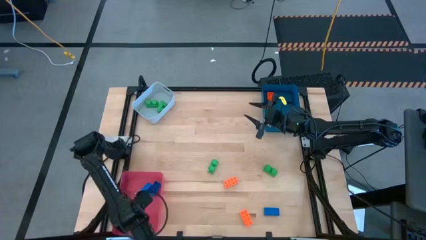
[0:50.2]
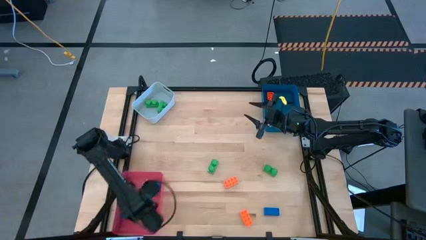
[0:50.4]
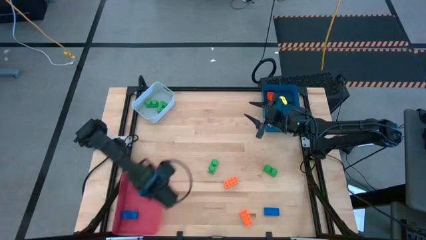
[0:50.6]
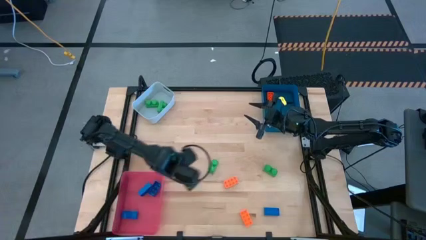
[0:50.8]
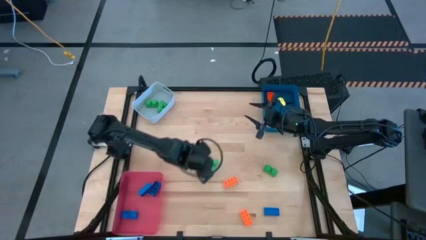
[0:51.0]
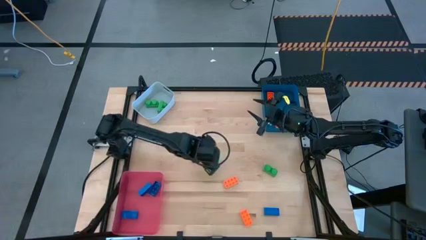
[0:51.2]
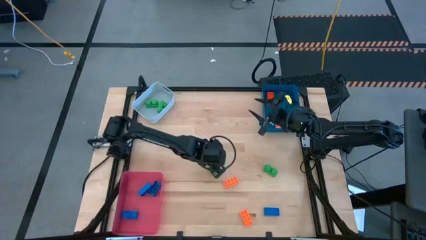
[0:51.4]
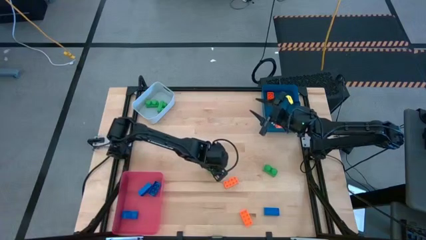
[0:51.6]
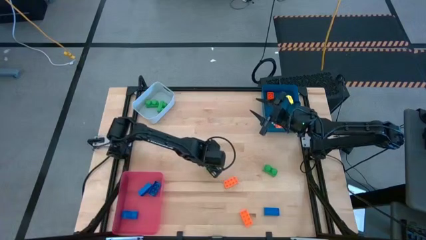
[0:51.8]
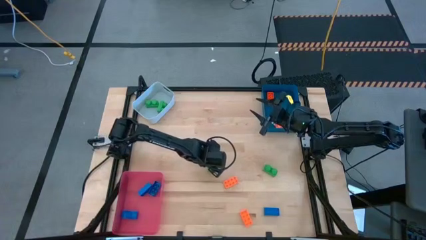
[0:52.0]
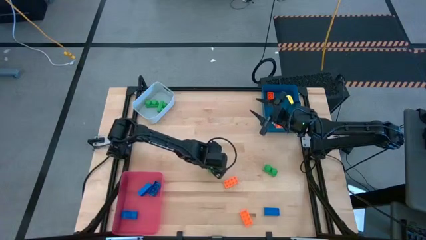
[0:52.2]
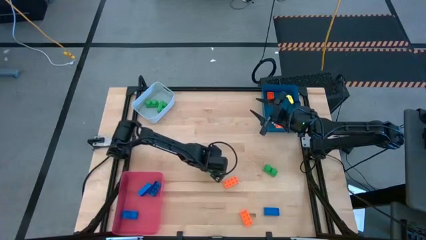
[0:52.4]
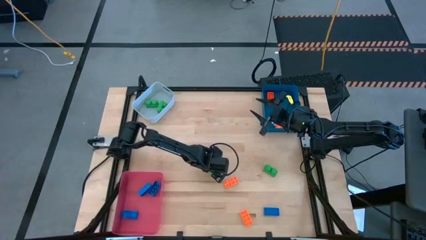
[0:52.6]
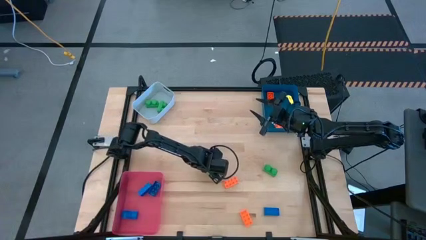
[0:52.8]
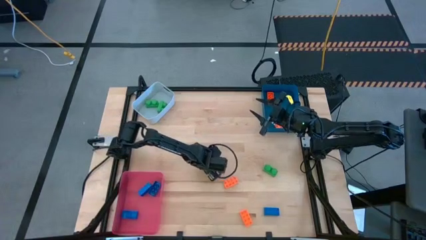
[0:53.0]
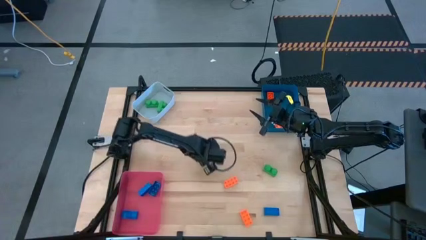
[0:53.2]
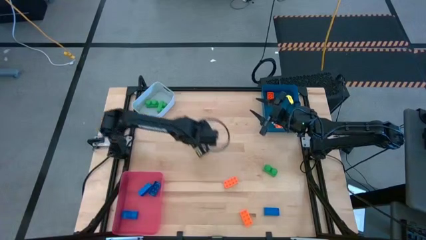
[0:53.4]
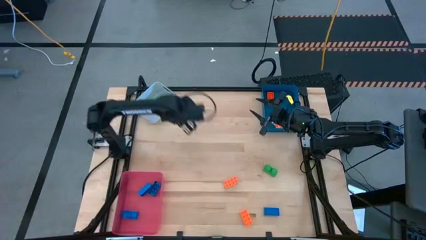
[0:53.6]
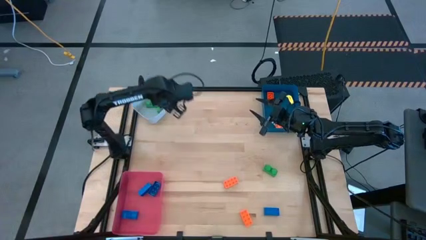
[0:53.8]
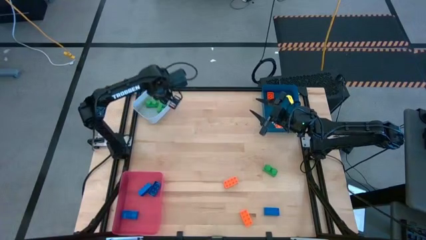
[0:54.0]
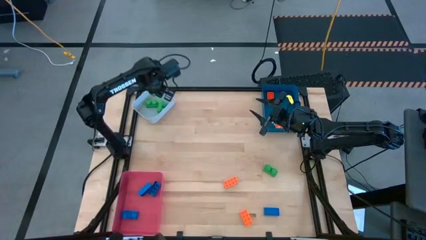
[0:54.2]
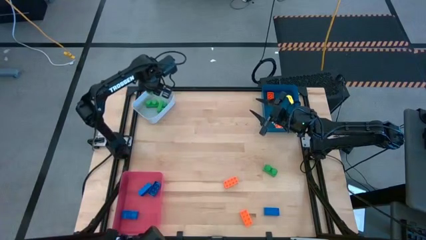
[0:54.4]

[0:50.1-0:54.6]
Task: Sort & place blocks by color
Put the green game piece into the gray bin

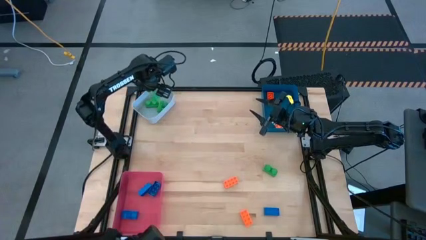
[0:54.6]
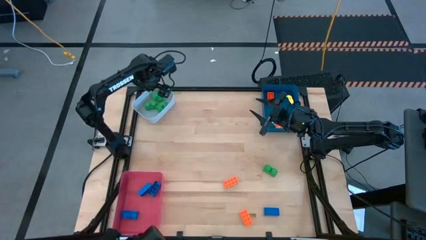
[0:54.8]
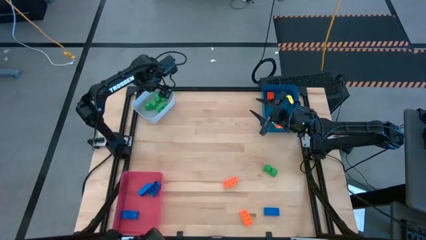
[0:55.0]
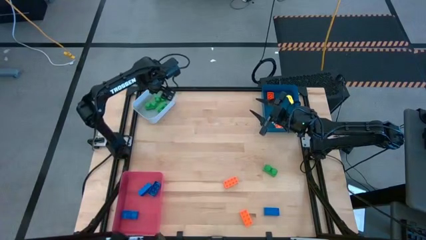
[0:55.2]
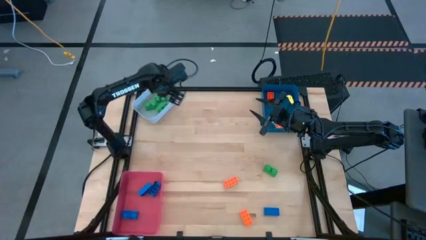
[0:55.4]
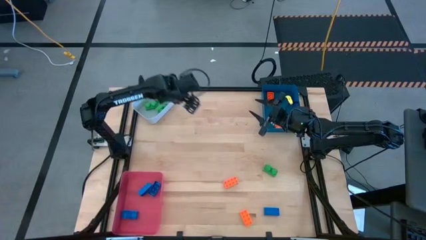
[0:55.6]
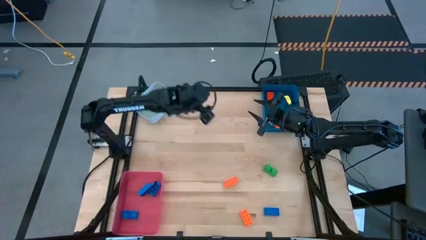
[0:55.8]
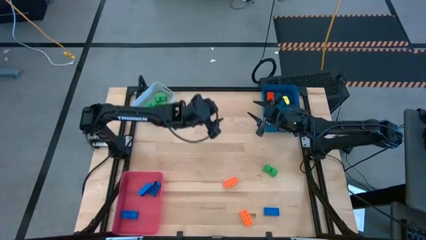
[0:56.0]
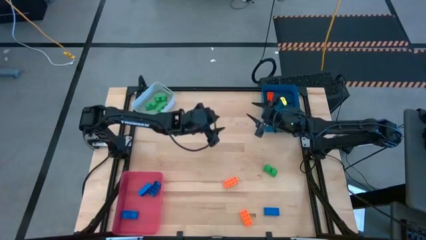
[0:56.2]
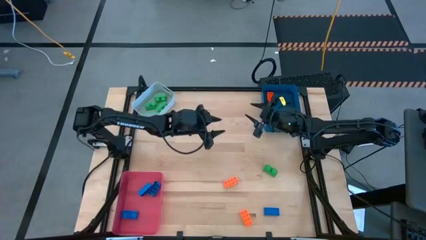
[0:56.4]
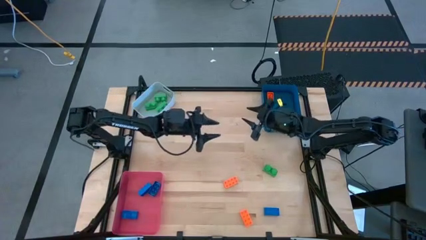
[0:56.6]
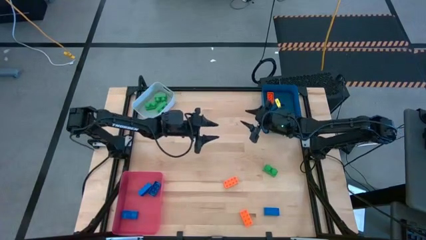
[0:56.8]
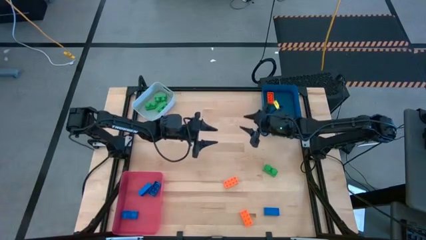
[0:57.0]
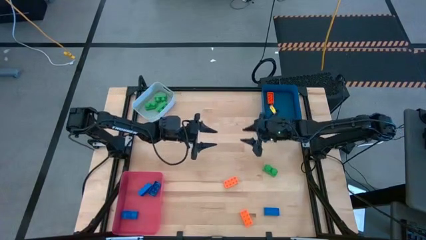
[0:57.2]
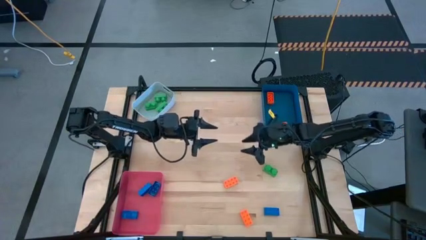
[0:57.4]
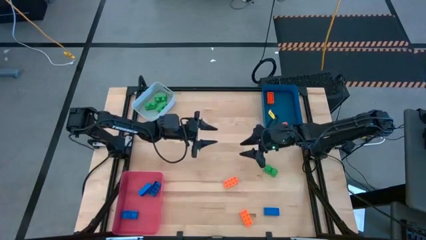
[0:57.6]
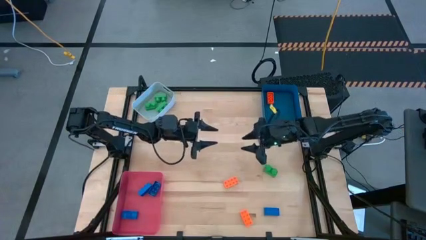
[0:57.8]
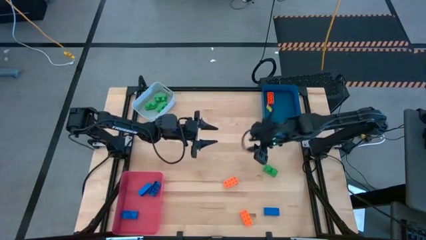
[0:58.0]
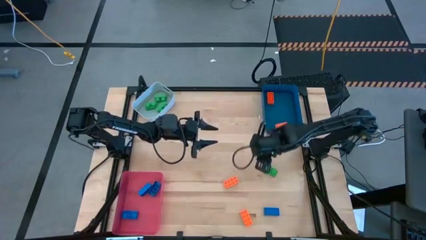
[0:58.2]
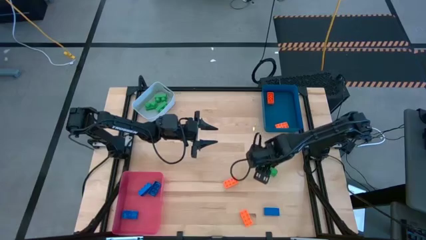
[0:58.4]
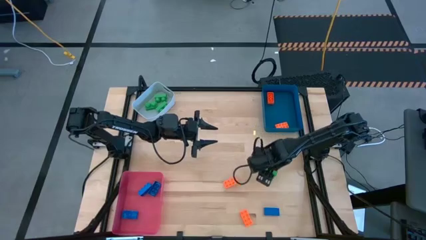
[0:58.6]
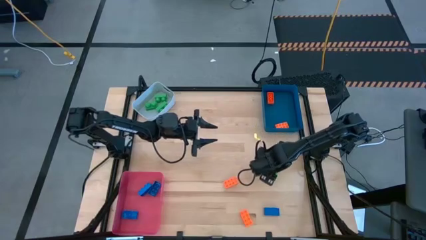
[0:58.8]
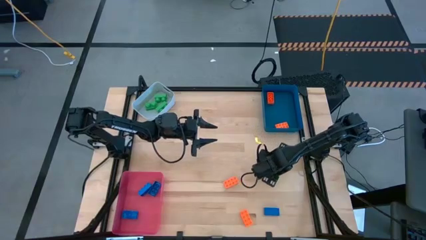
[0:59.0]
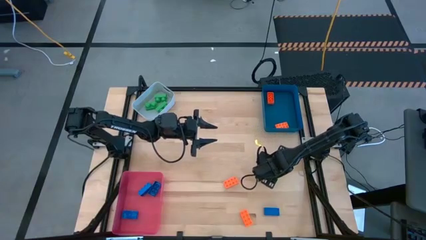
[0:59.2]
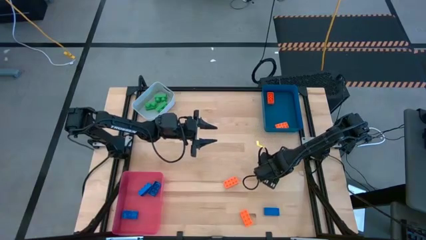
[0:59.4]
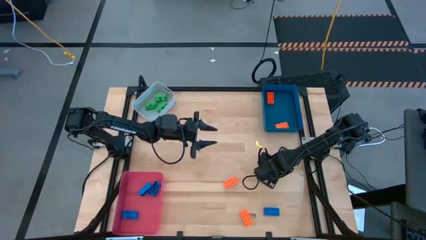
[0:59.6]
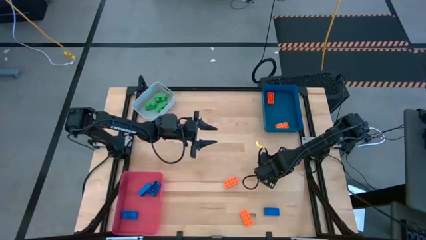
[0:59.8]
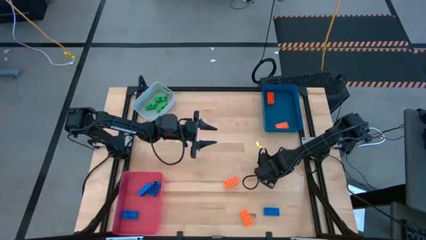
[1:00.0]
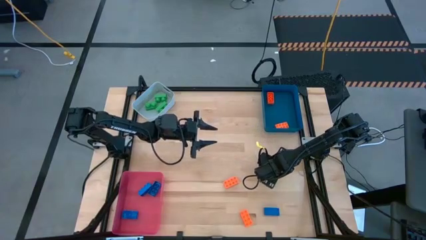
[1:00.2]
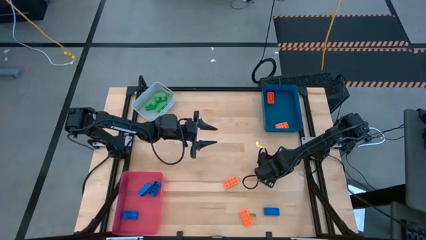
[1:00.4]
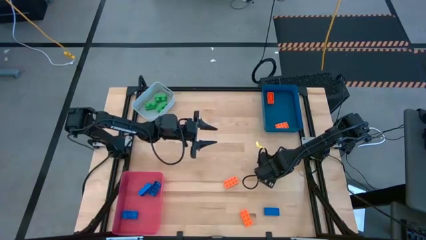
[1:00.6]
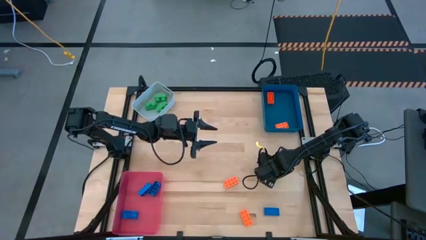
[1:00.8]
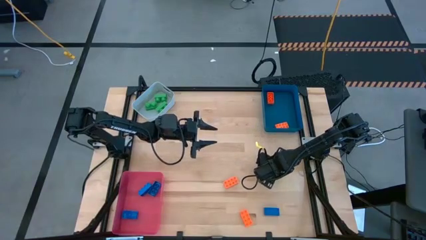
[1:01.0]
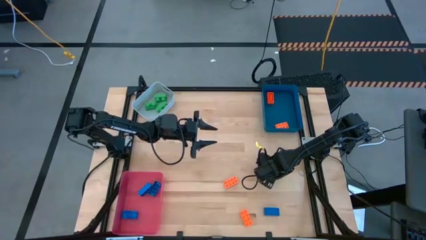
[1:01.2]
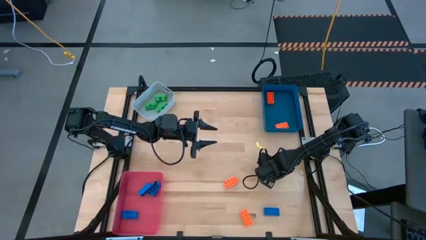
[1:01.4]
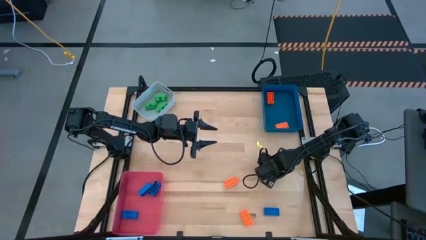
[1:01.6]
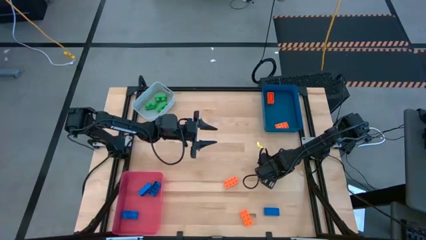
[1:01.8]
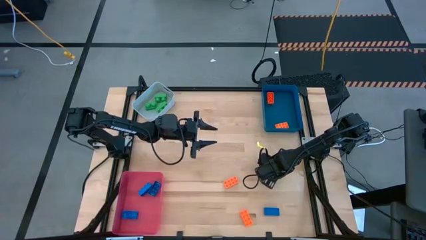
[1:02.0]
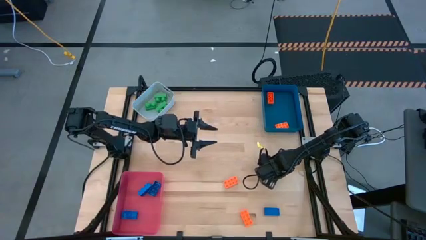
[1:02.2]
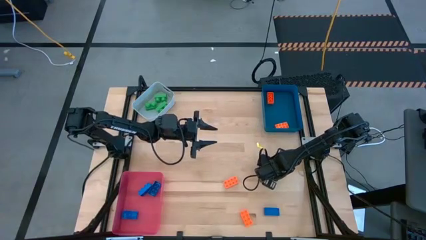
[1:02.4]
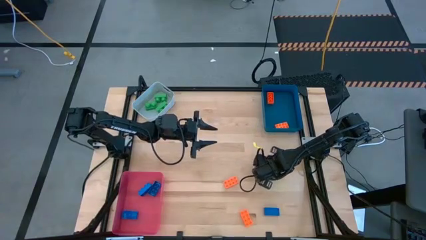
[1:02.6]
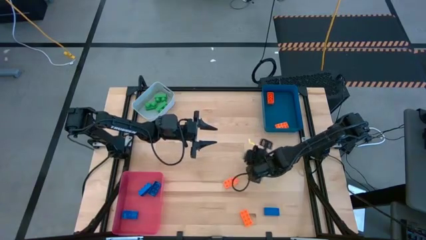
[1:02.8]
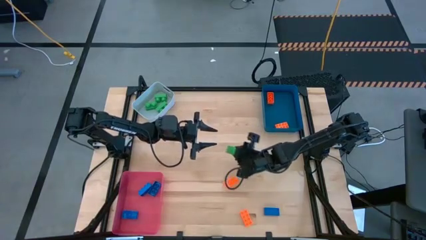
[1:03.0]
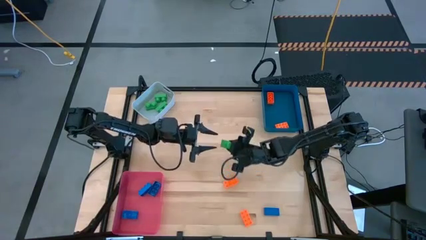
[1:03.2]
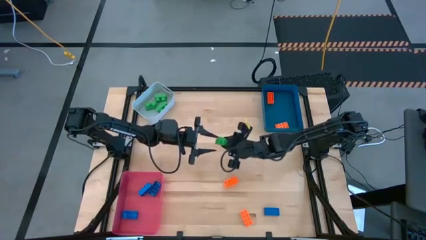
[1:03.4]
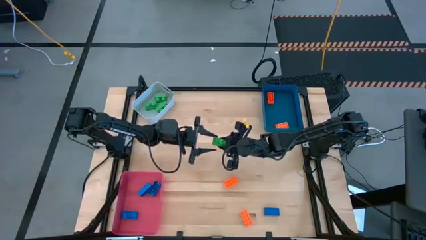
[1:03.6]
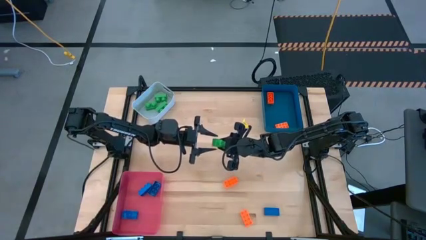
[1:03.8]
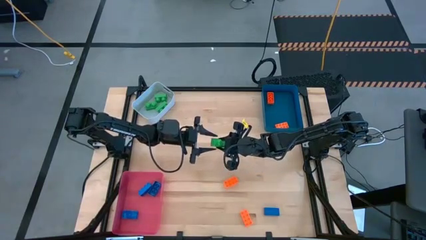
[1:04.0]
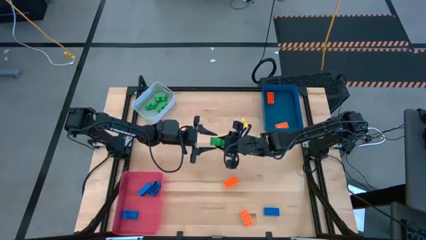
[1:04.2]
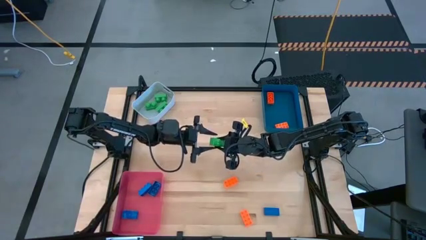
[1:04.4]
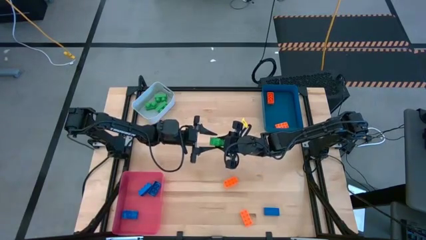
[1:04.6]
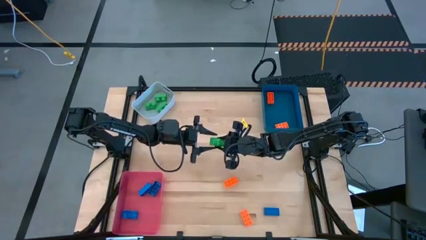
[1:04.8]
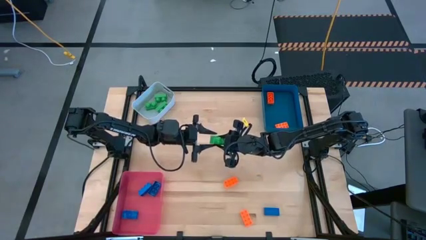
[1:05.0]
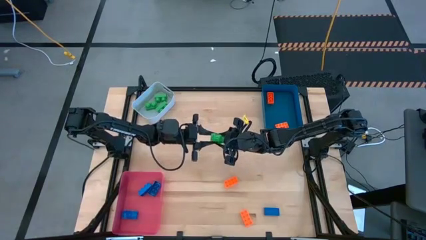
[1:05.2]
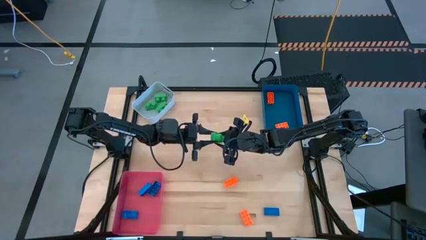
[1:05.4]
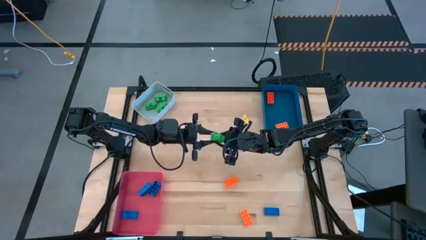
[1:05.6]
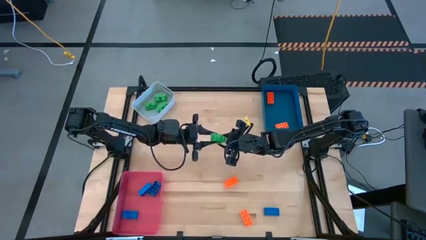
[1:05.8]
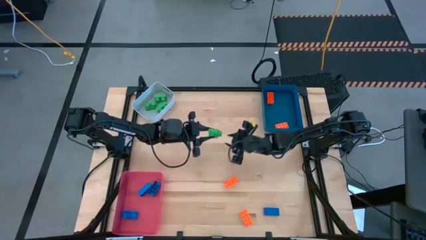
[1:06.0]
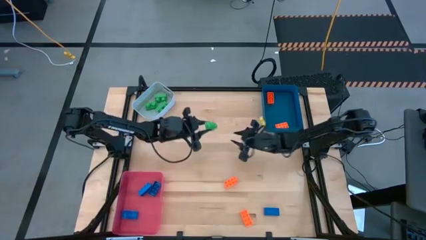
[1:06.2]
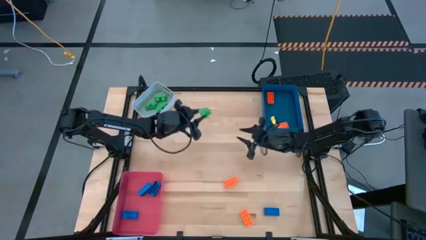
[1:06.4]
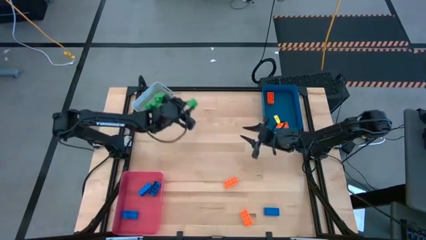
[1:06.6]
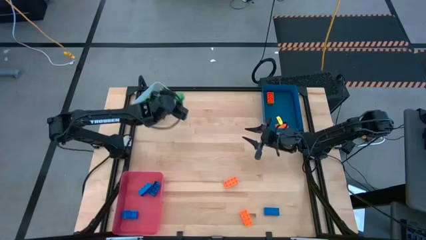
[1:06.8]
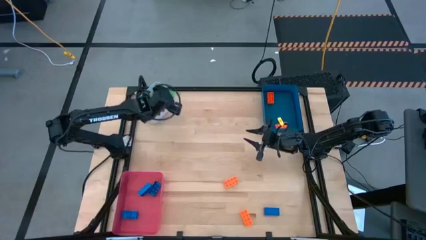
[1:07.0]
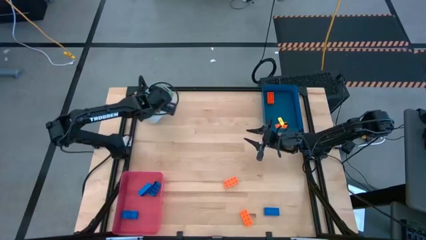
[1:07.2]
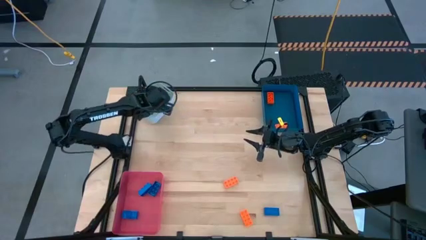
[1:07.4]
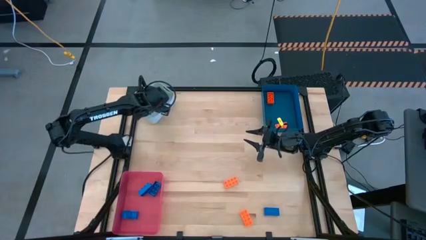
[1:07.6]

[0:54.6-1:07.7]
Put the green game piece into the gray bin
